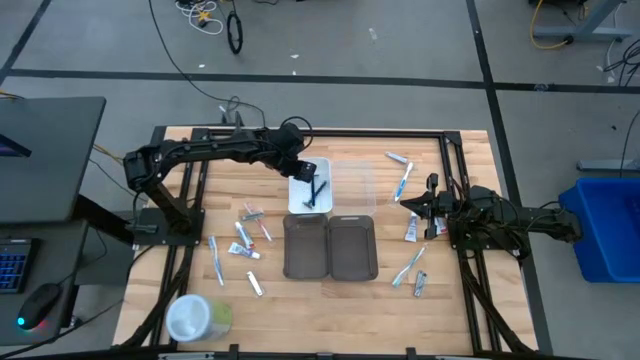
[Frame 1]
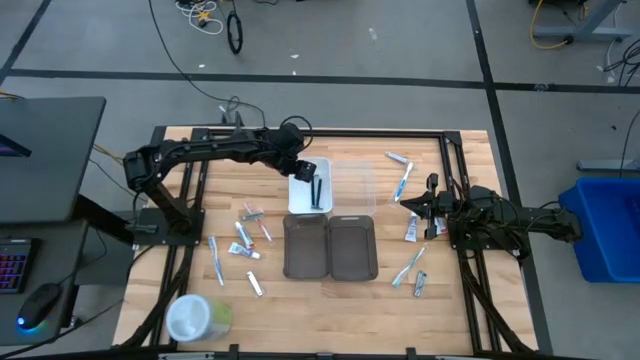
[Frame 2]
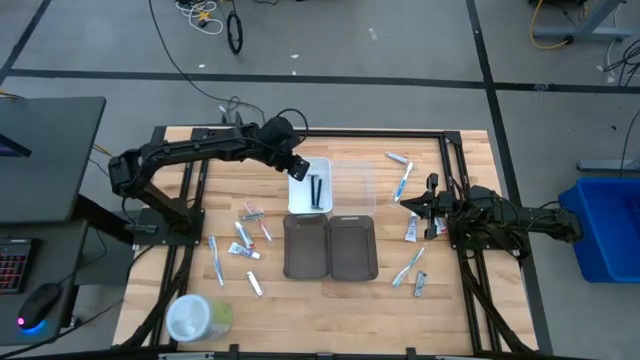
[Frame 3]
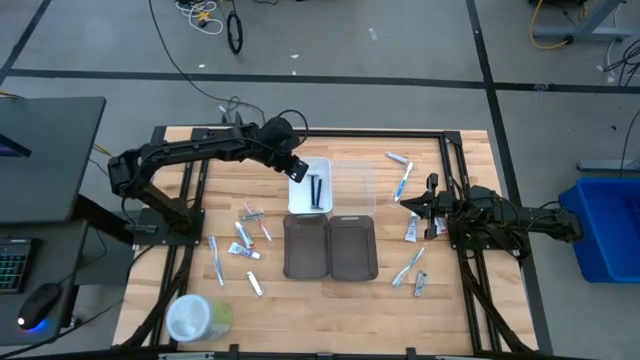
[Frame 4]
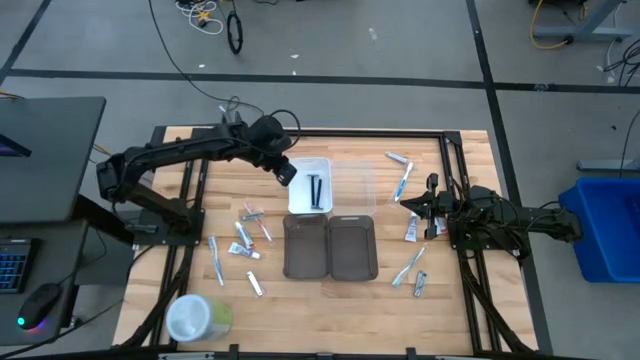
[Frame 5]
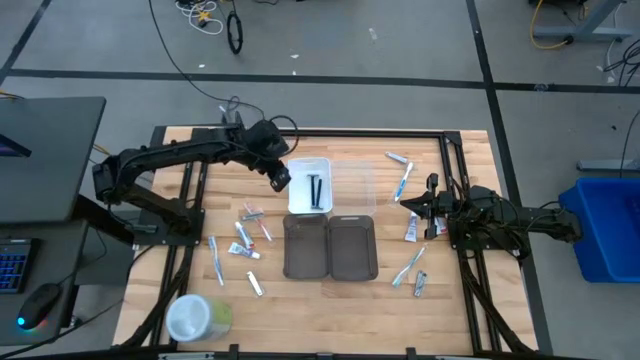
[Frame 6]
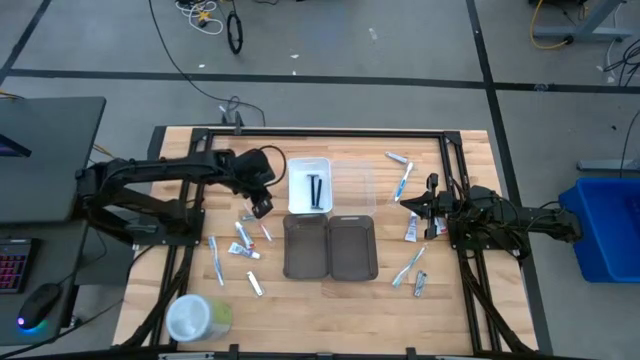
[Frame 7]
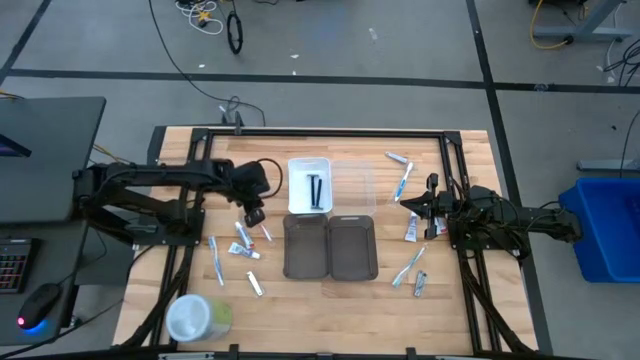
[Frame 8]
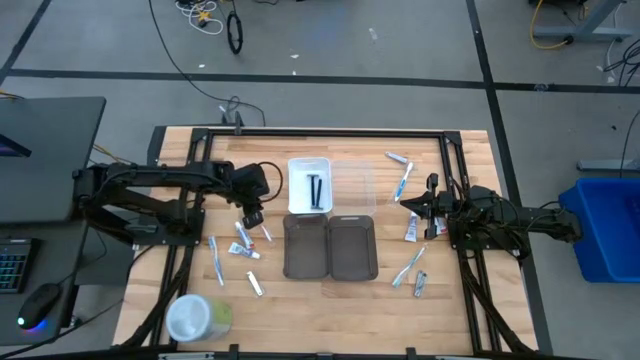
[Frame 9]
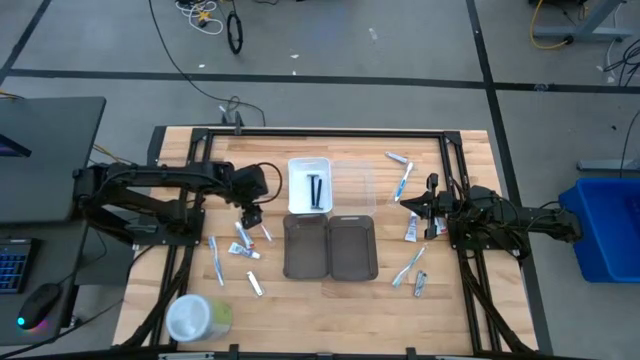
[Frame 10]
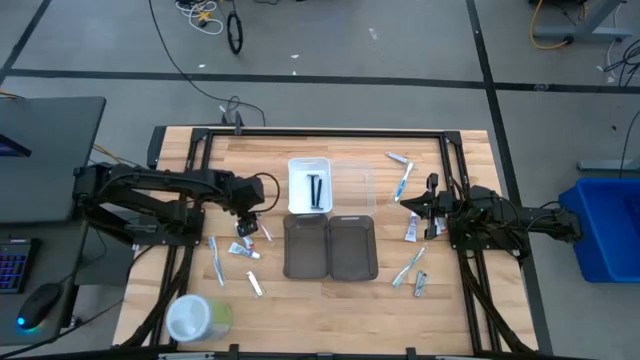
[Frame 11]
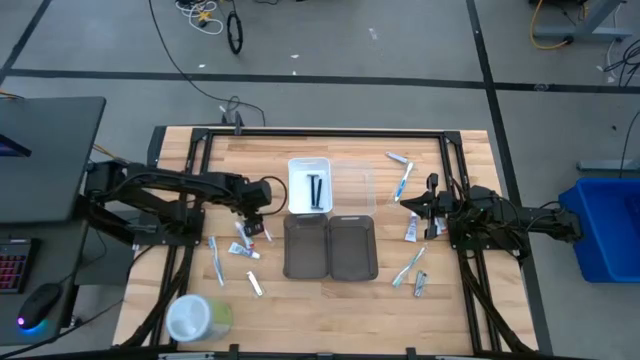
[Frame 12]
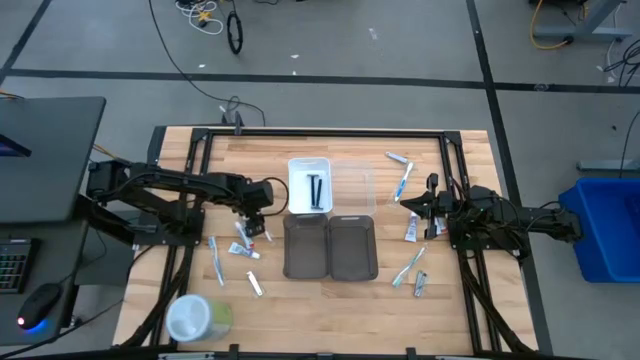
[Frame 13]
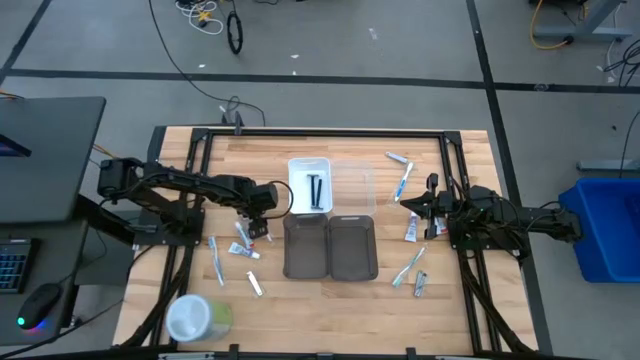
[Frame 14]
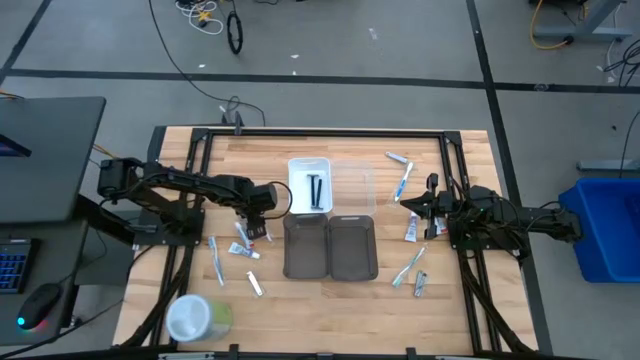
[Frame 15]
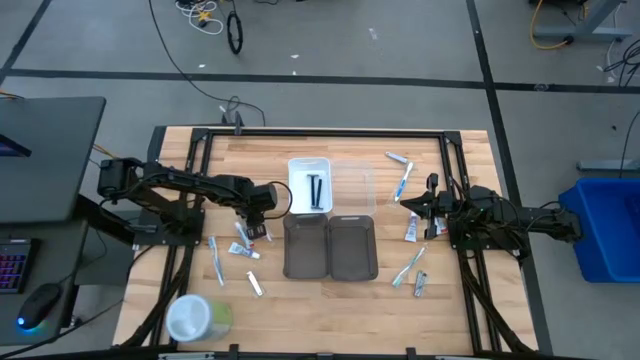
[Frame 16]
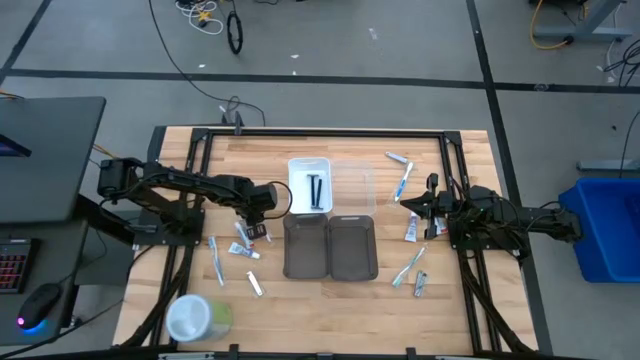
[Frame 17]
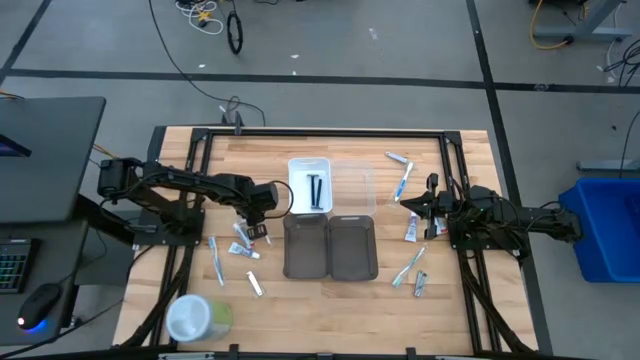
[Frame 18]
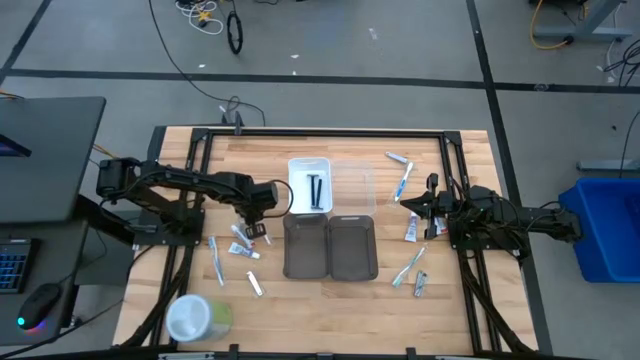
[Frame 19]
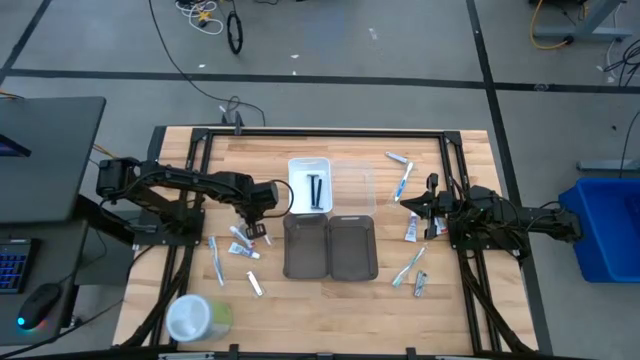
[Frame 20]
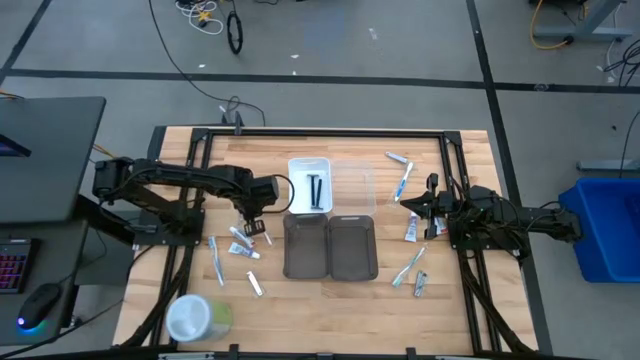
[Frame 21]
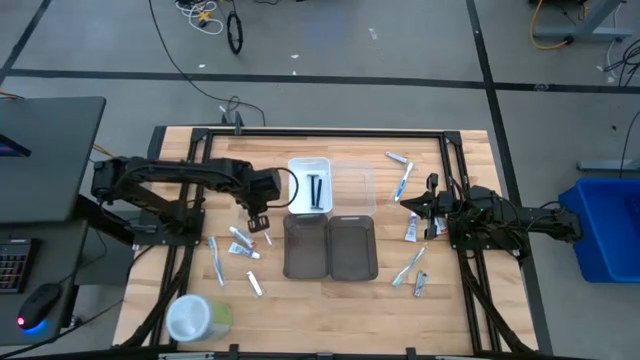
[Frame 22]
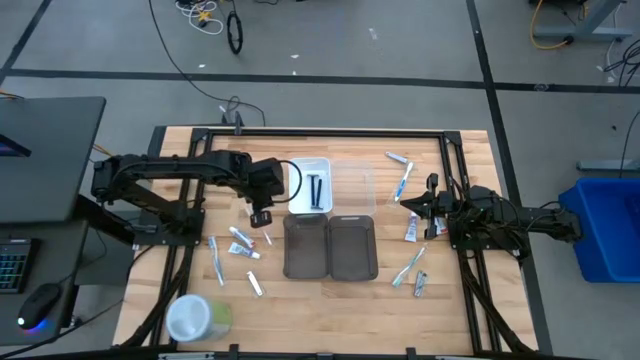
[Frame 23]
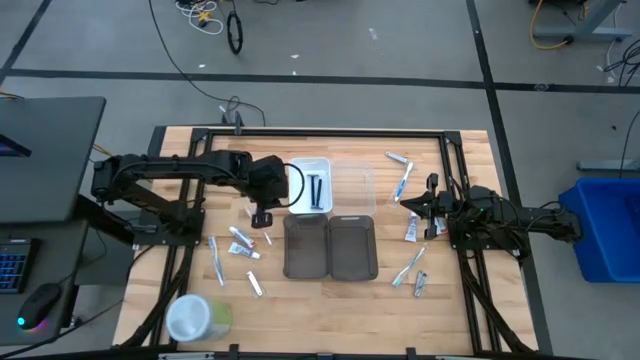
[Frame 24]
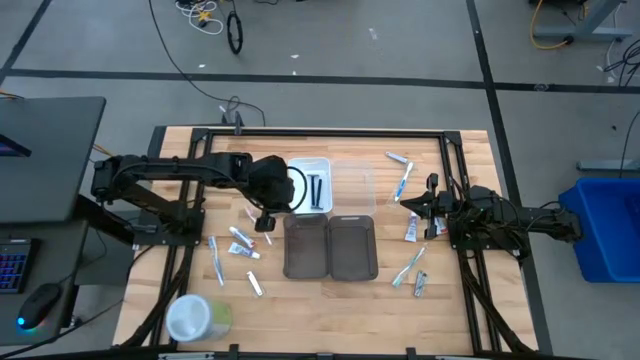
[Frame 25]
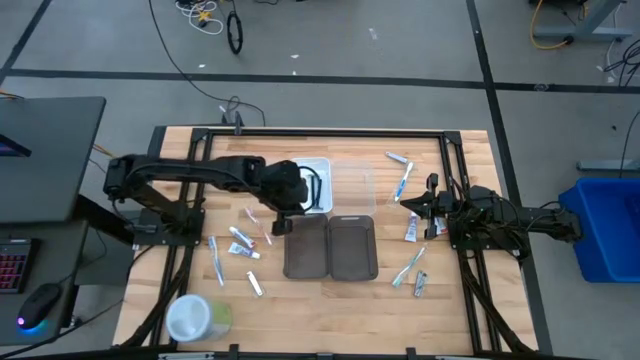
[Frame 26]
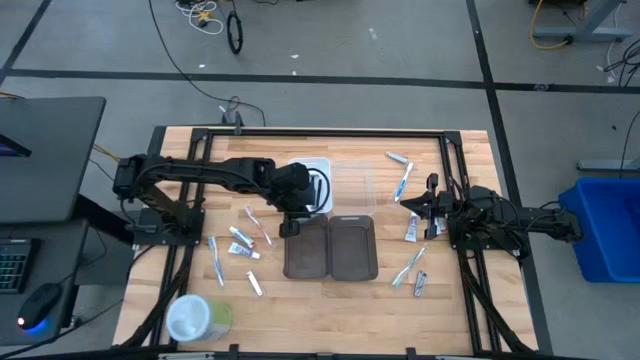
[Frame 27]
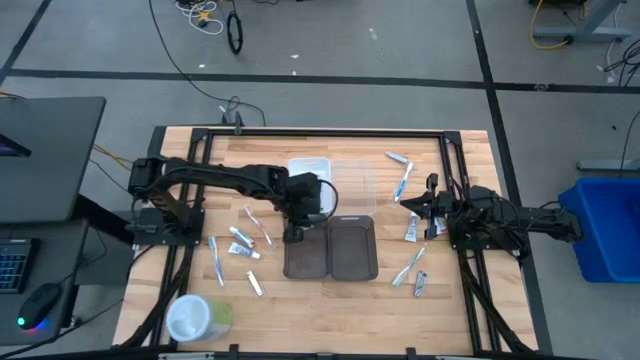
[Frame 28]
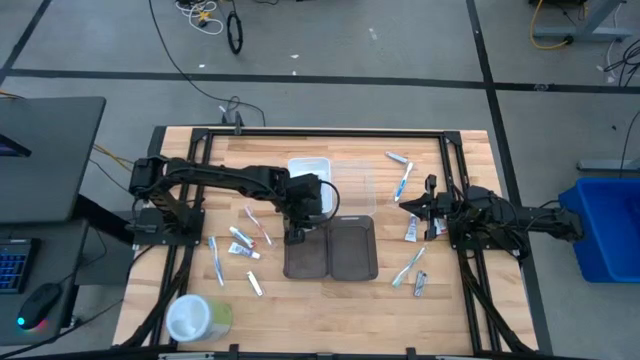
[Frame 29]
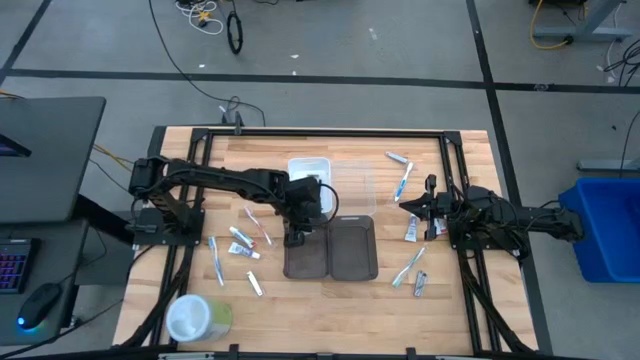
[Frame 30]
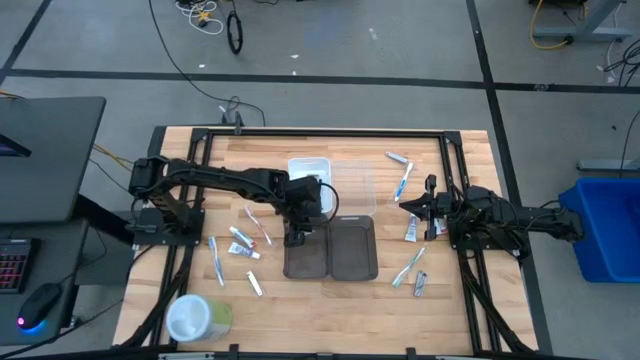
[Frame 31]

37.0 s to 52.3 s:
Task: Pick & Place Travel size toiletries
Put the silver nail cutter into the left black bin

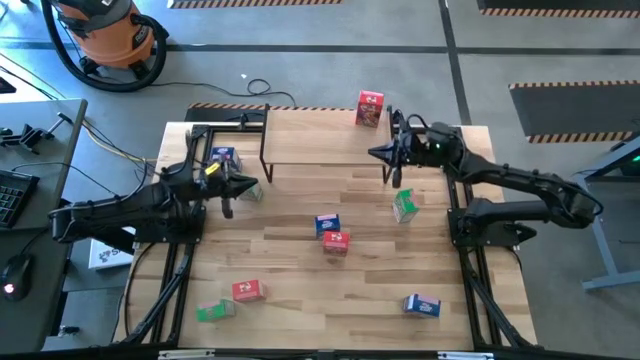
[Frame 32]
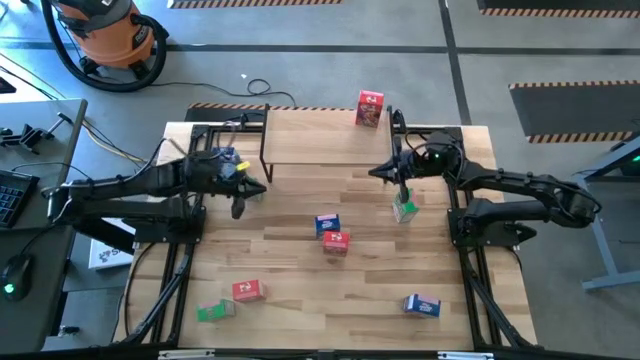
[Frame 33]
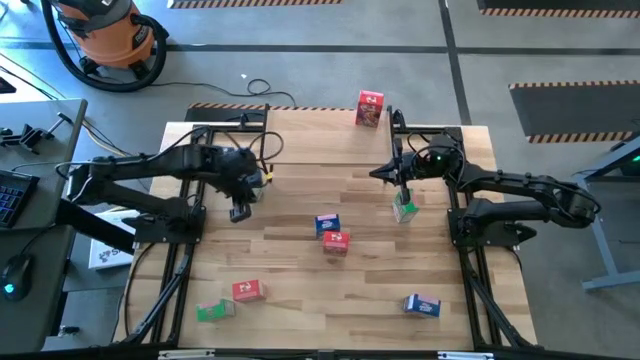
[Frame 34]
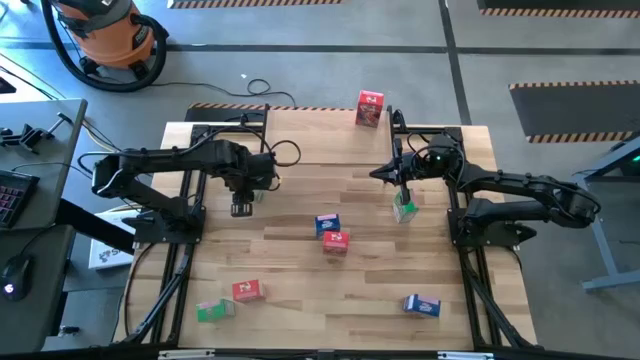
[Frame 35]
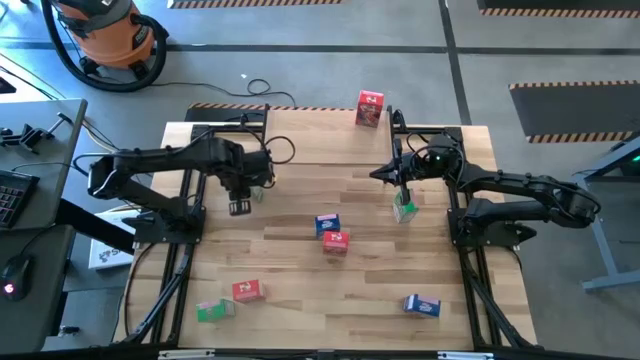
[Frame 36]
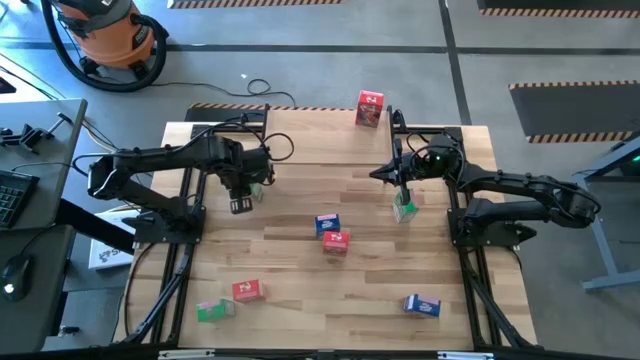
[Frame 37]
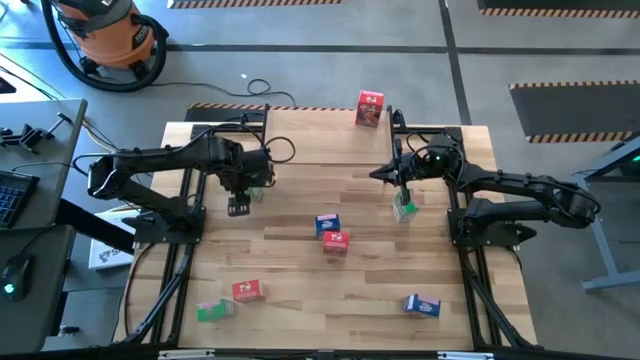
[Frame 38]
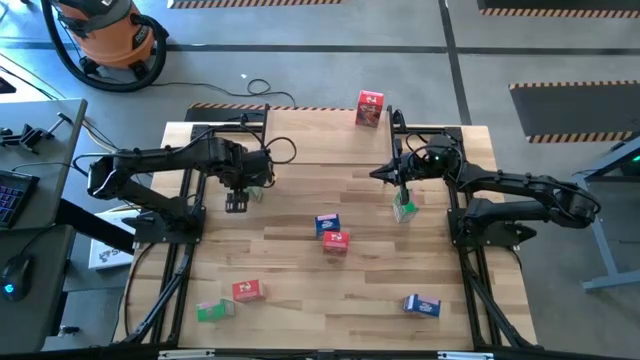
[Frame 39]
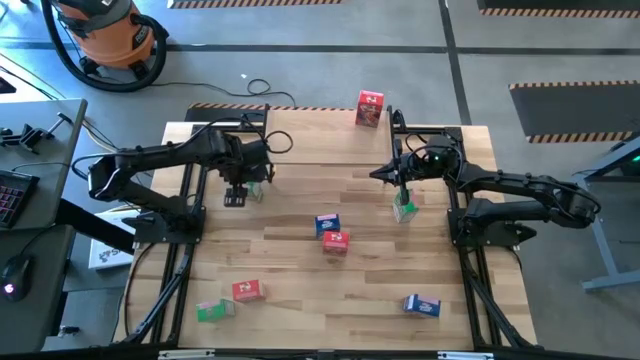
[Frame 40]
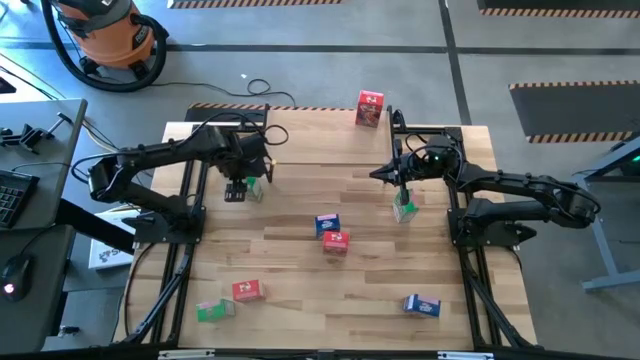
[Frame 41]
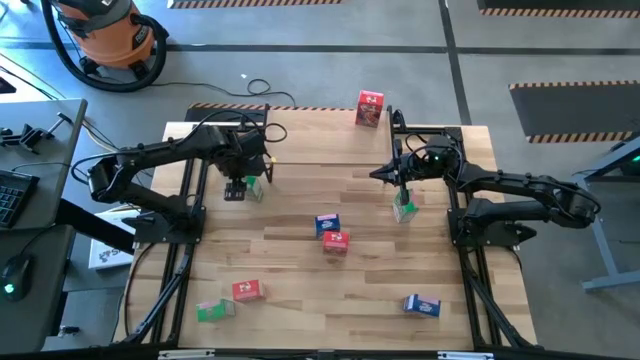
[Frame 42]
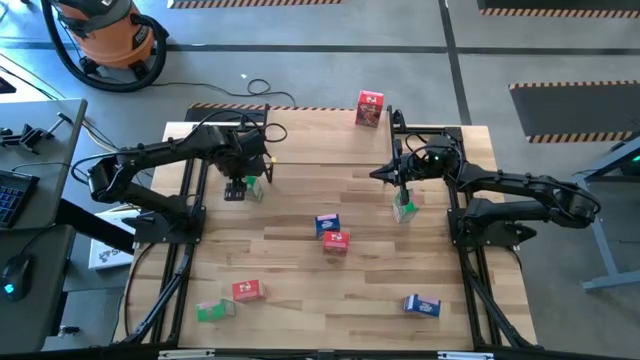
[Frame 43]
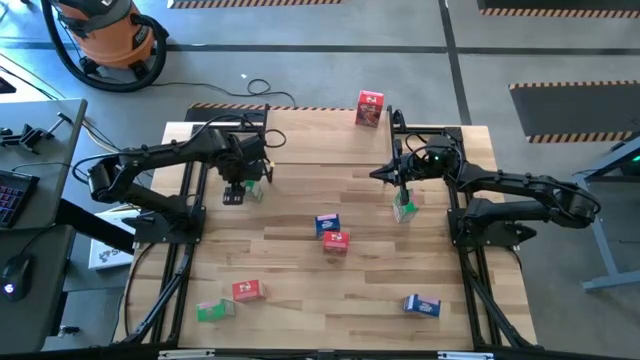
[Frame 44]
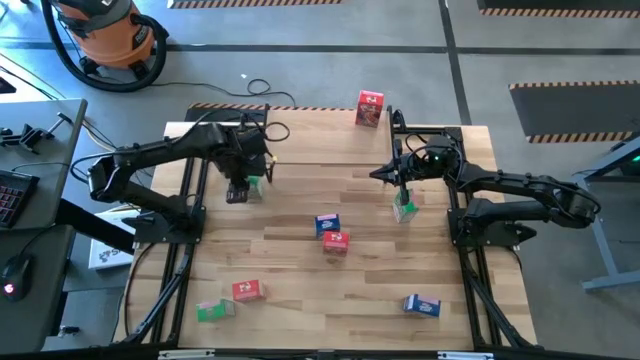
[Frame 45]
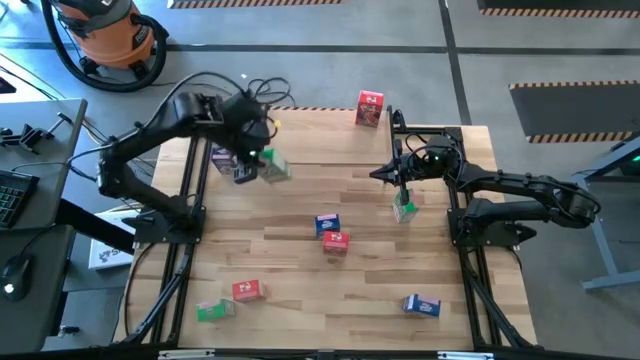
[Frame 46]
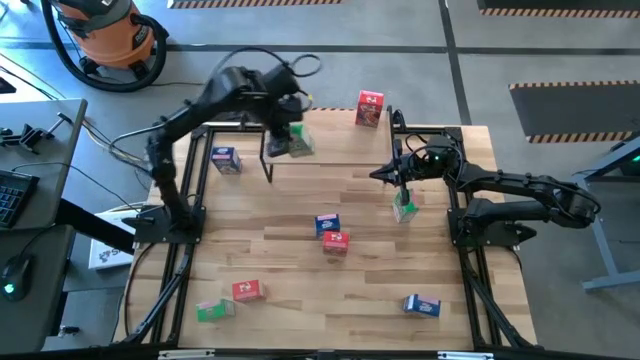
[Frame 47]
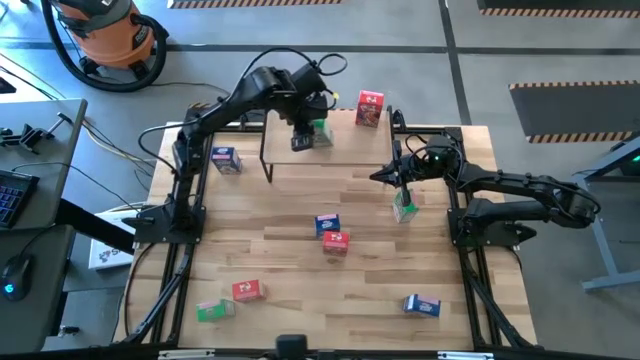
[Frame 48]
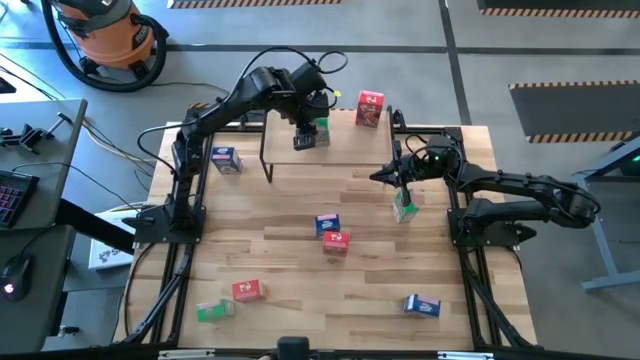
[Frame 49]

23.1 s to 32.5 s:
Task: Stack cereal on shelf
Put the top left green cereal box on the shelf
